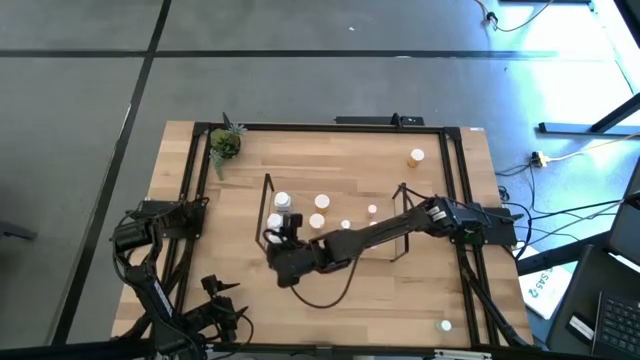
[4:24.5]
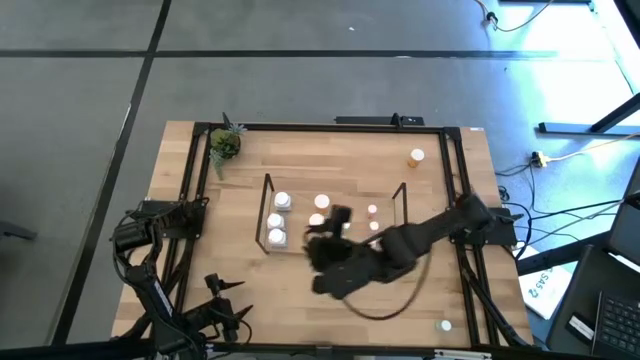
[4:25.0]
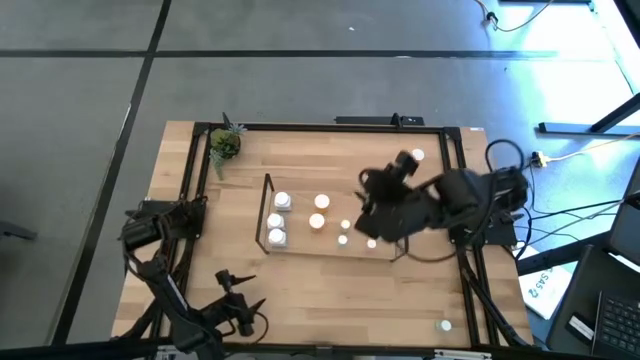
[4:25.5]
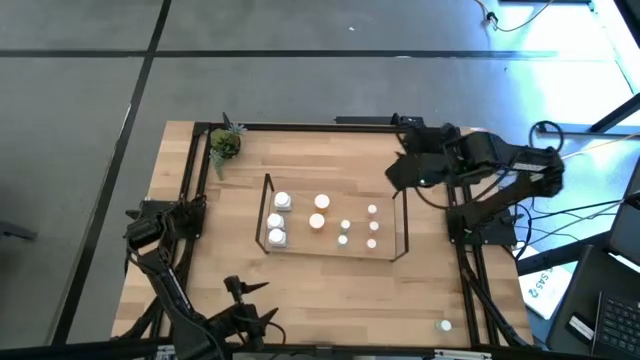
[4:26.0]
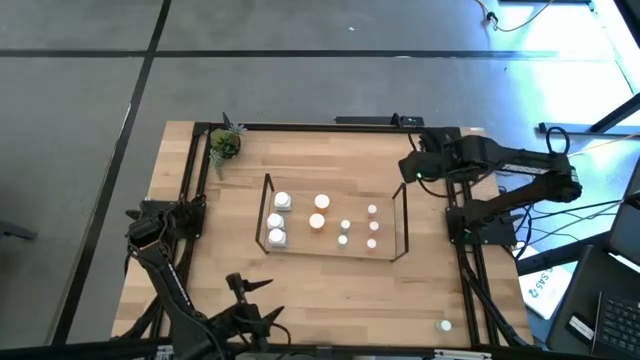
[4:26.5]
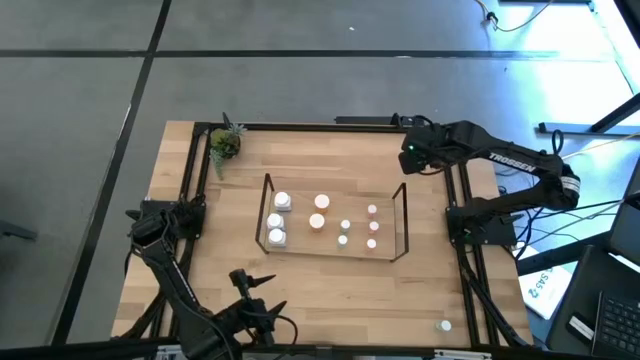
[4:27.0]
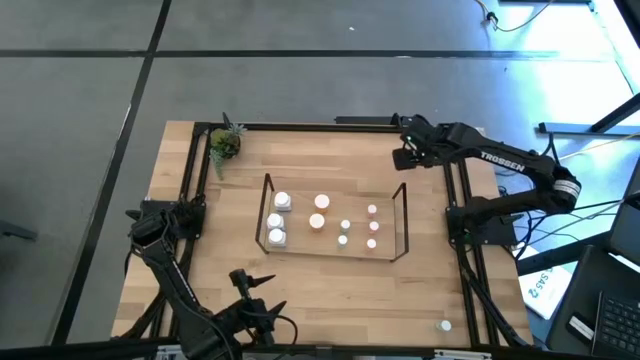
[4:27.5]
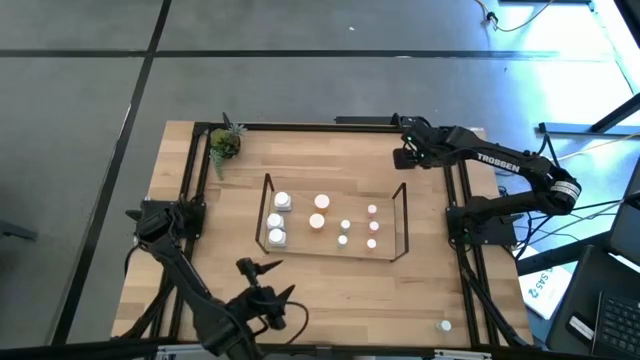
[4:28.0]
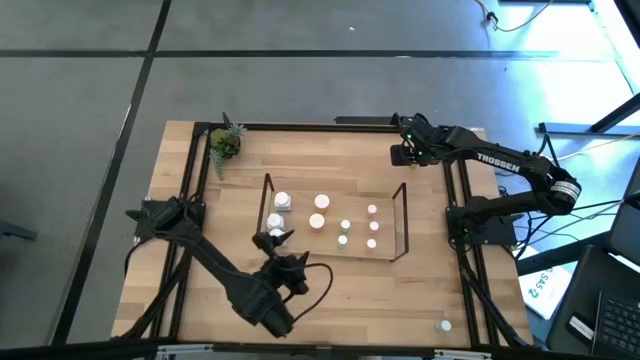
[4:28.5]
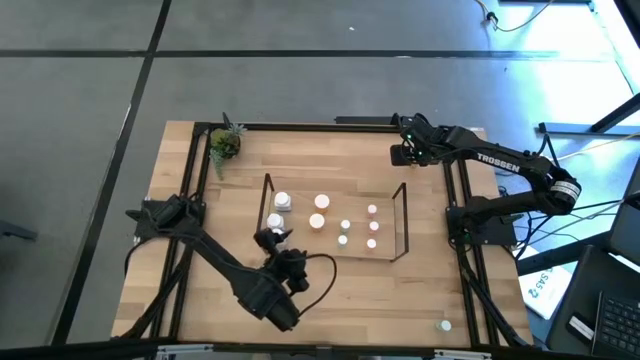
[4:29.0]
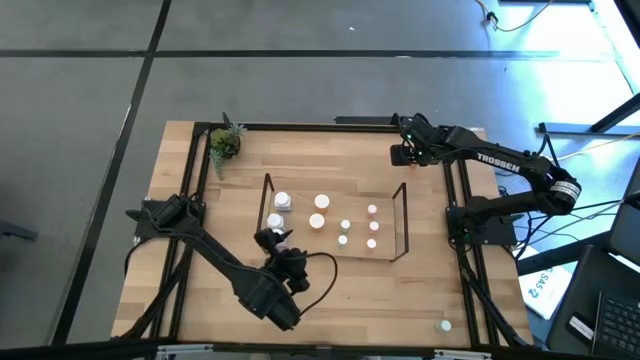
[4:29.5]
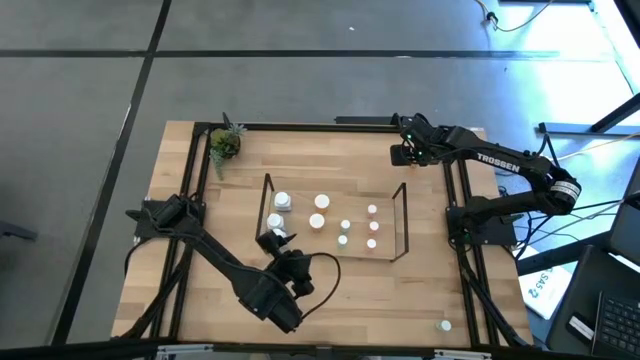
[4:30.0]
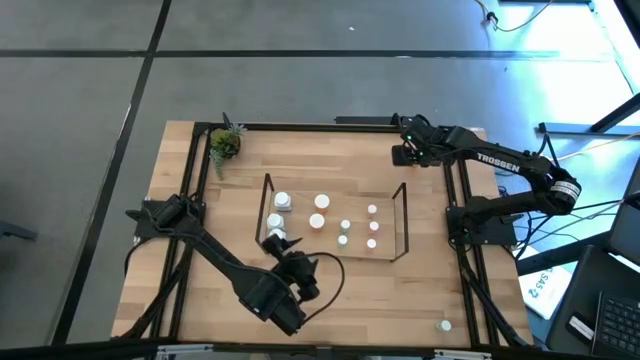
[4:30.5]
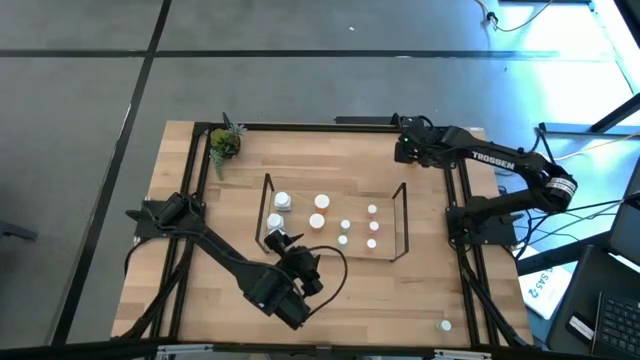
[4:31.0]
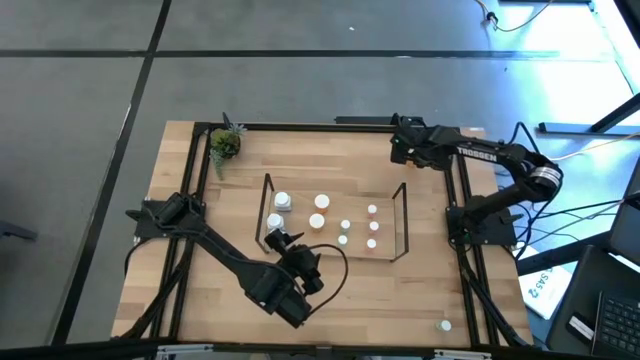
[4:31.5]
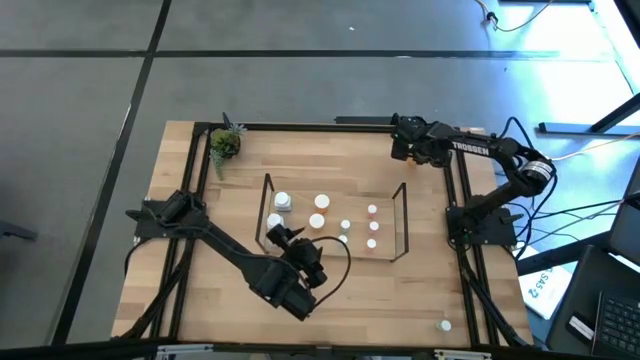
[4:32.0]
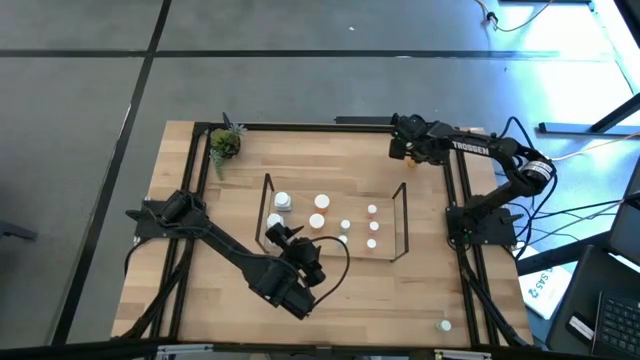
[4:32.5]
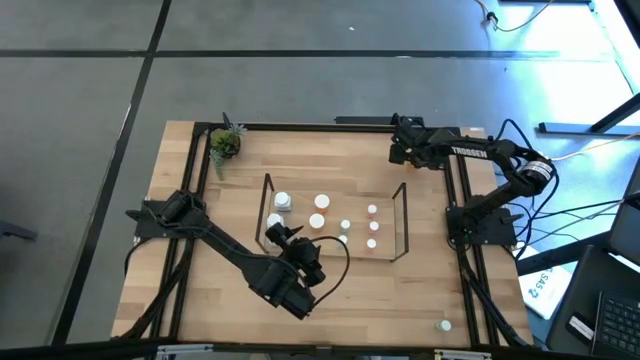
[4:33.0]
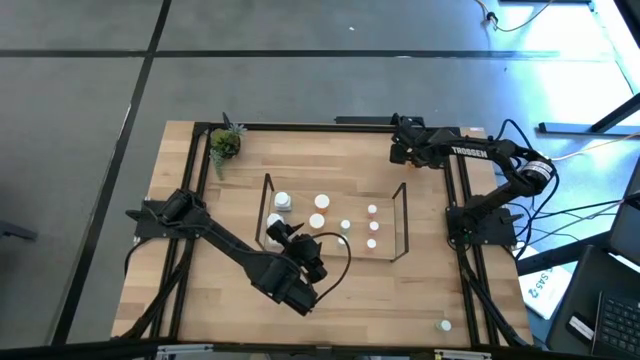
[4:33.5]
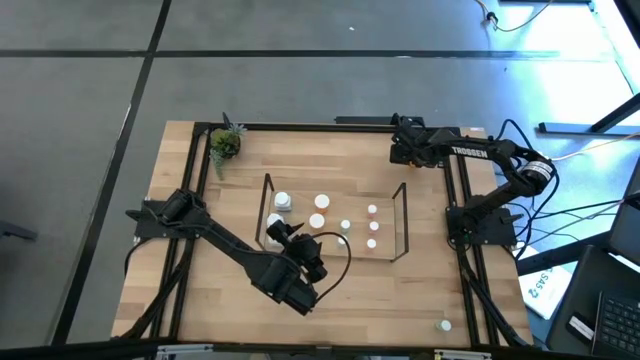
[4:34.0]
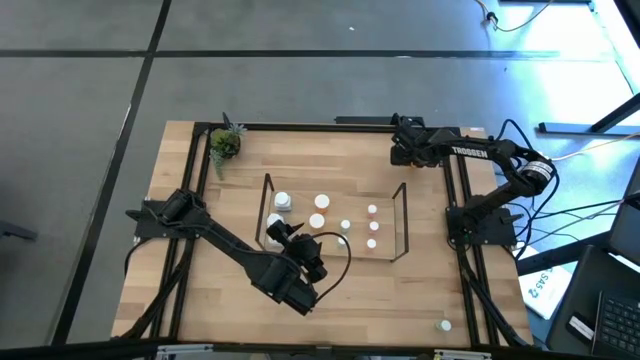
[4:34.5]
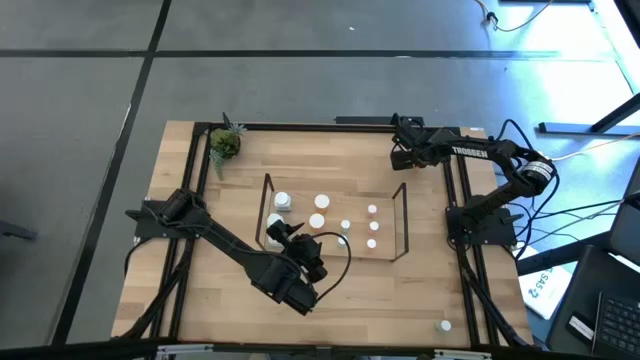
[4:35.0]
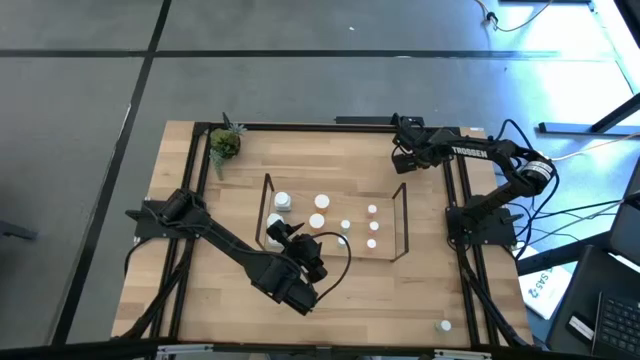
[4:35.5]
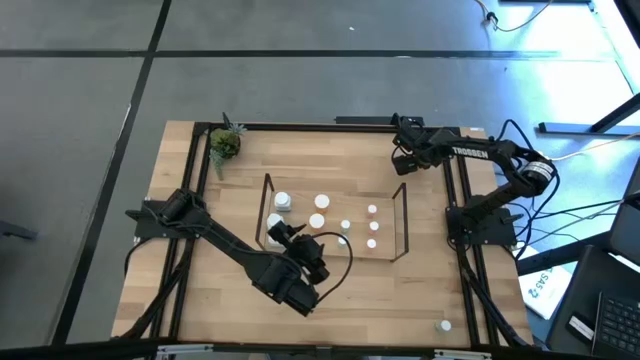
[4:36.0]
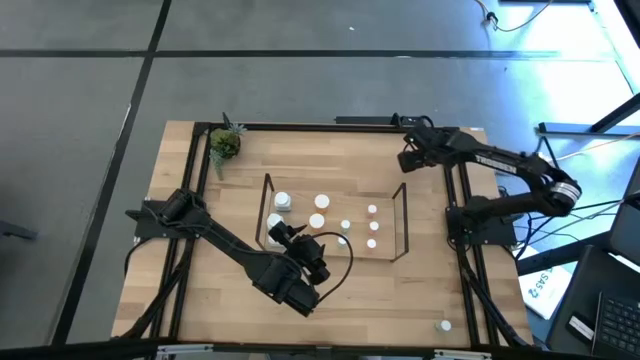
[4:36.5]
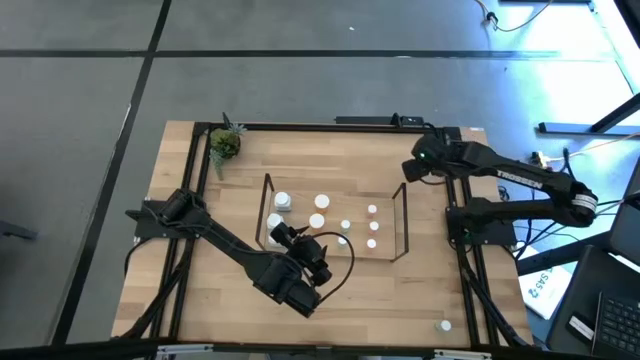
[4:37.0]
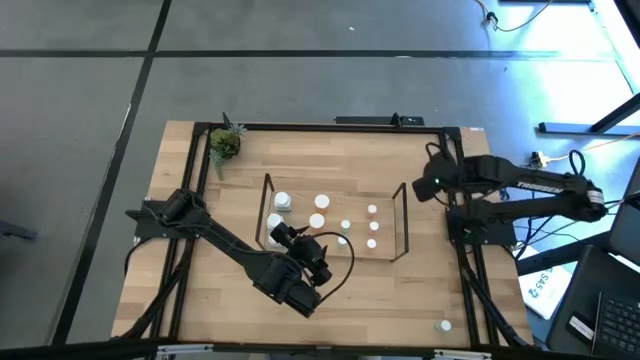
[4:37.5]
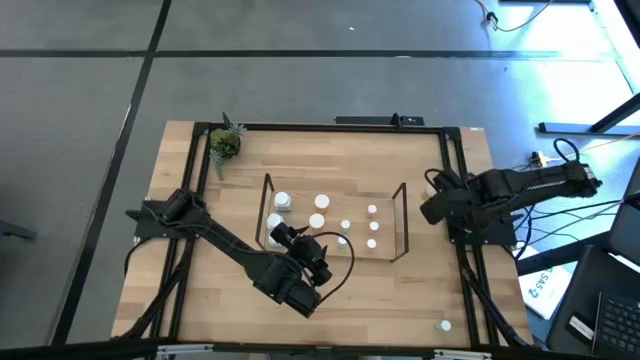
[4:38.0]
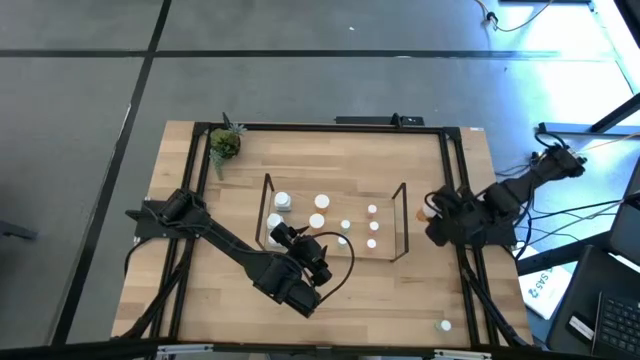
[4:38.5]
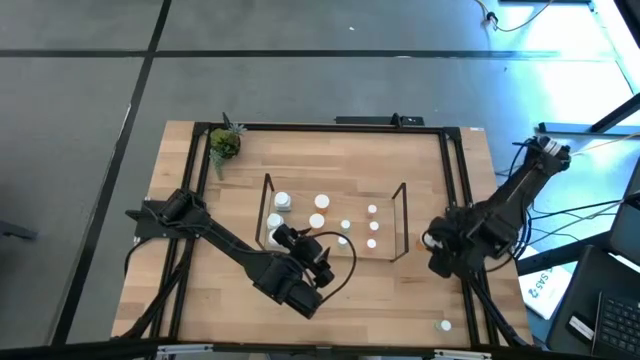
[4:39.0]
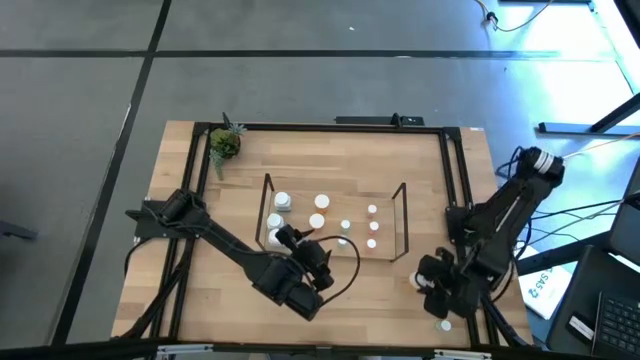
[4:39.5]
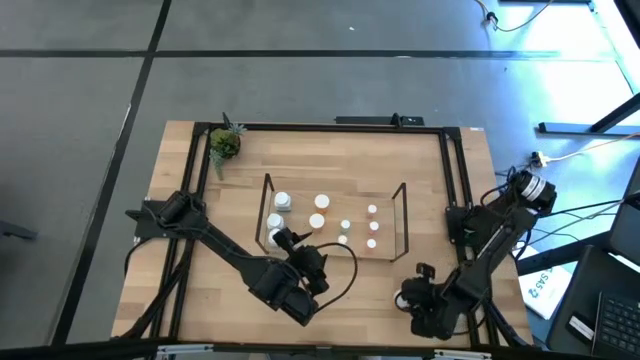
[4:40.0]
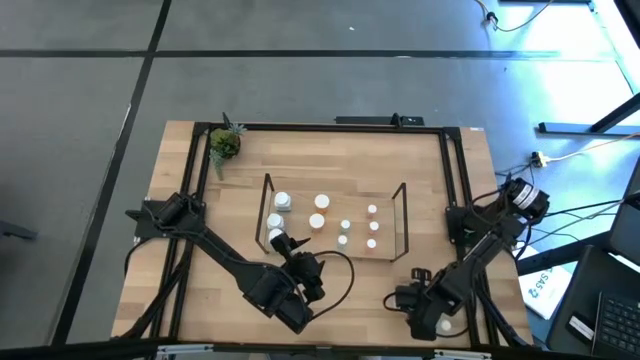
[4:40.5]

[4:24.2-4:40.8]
Task: Pick and place medicine bottles onto shelf by color
Put the orange pill bottle on the shelf aligned with the other orange pill bottle

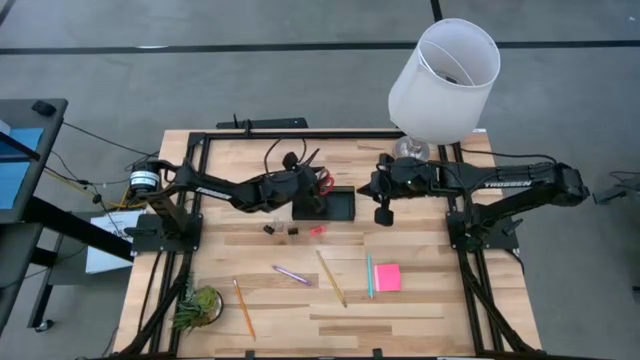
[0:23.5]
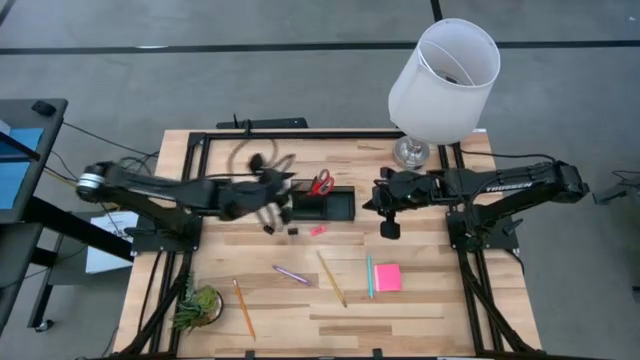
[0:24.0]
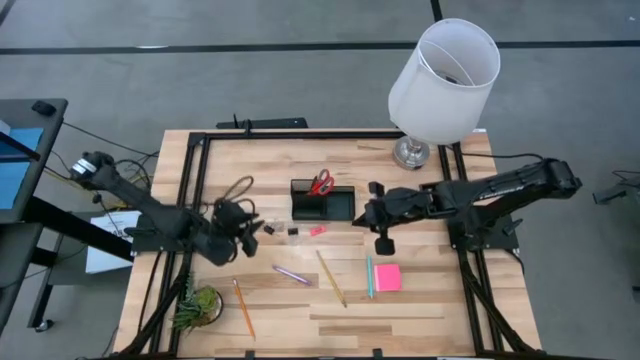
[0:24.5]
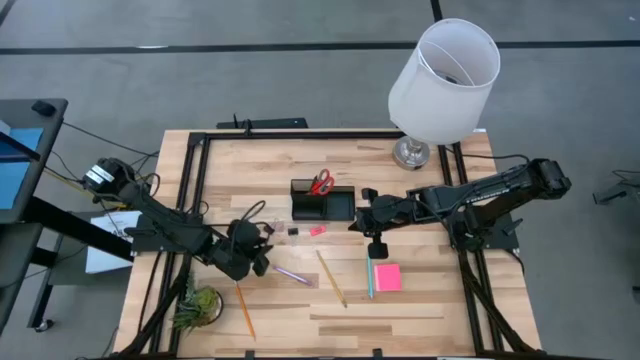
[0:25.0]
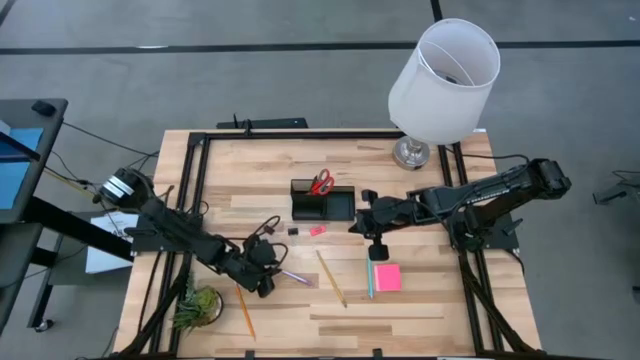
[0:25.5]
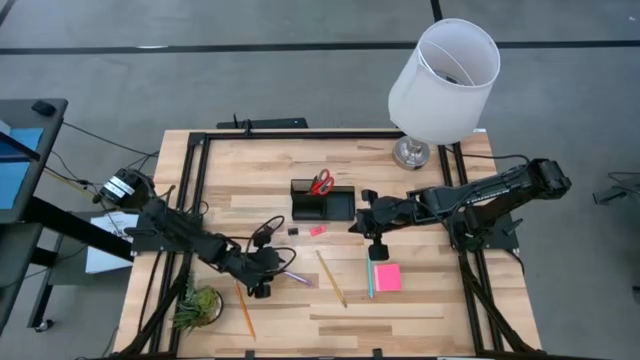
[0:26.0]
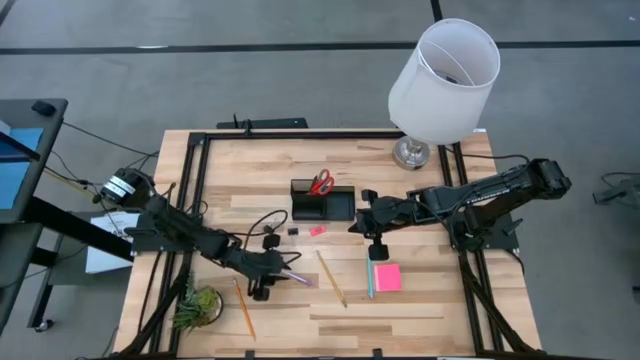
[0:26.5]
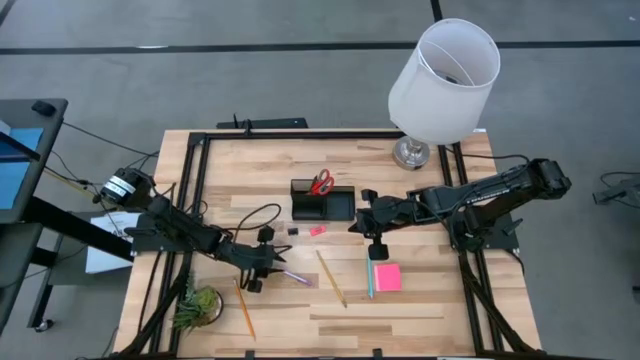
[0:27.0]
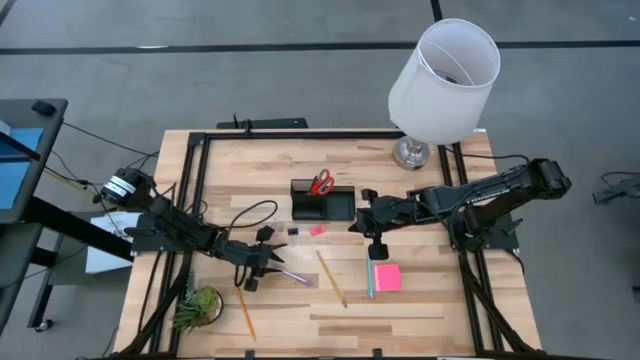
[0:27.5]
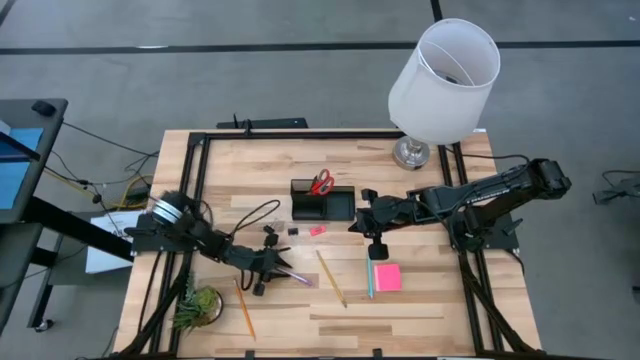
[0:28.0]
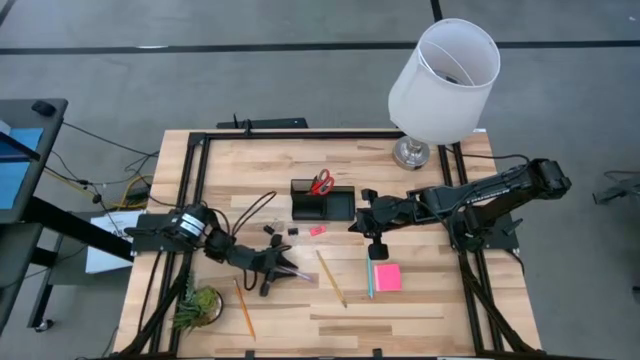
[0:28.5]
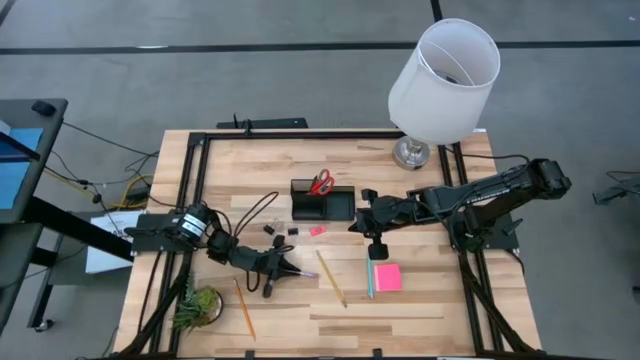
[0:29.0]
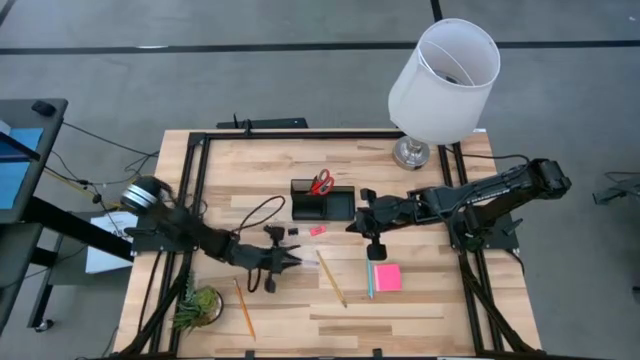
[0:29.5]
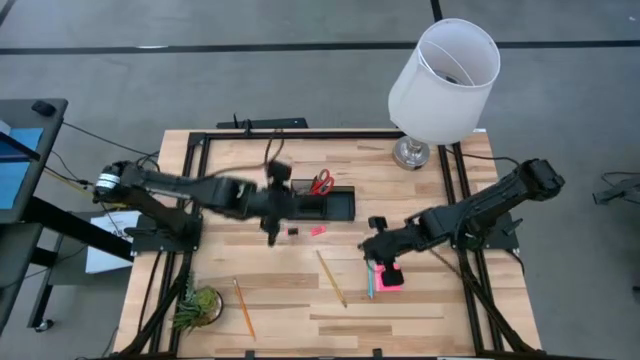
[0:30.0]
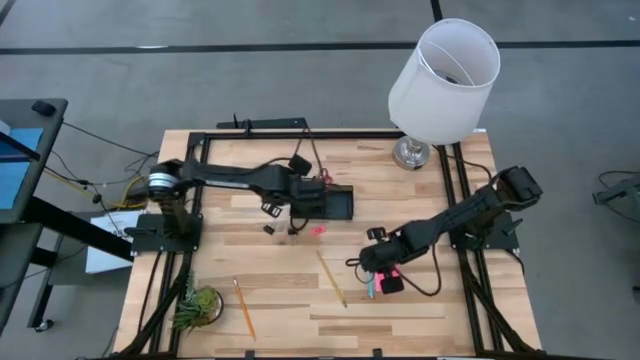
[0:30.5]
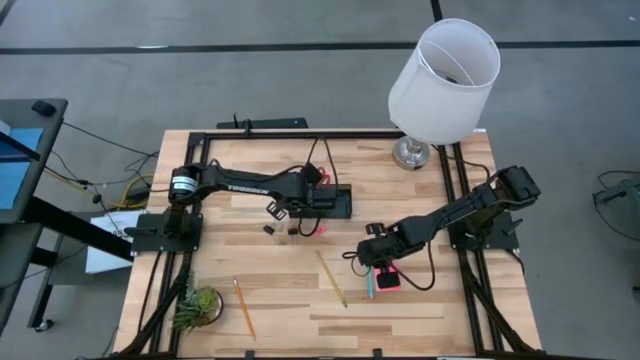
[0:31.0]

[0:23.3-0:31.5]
Task: Pick and place office supplies into organizer
Put the purple pen into the top left compartment of the black desk organizer
